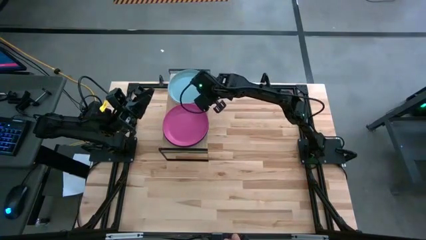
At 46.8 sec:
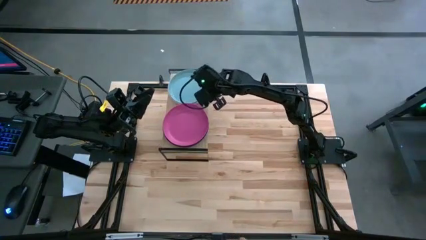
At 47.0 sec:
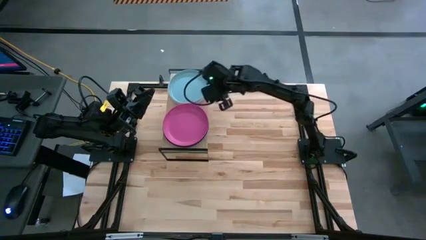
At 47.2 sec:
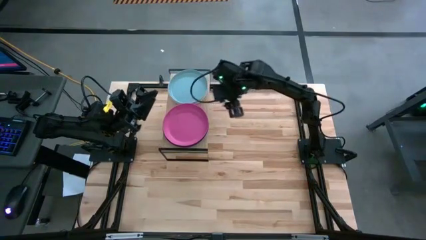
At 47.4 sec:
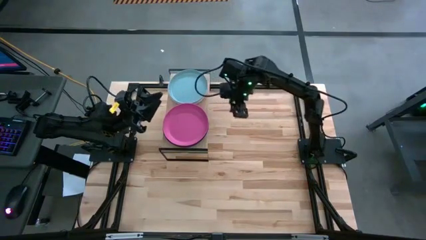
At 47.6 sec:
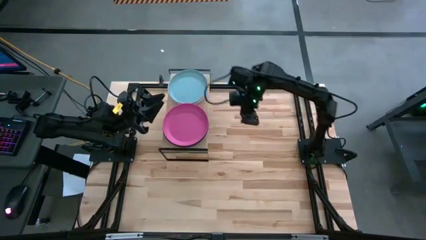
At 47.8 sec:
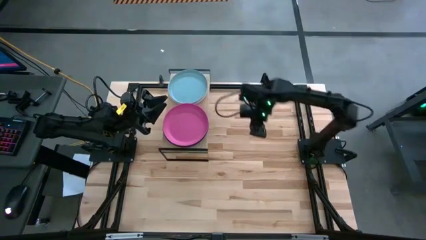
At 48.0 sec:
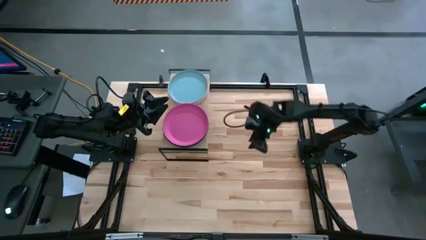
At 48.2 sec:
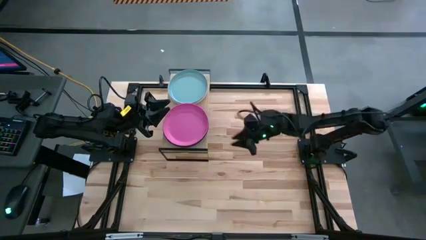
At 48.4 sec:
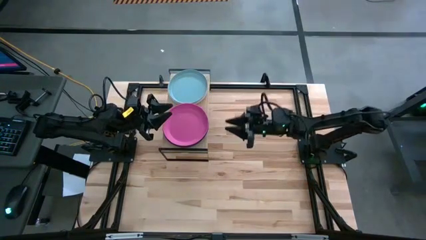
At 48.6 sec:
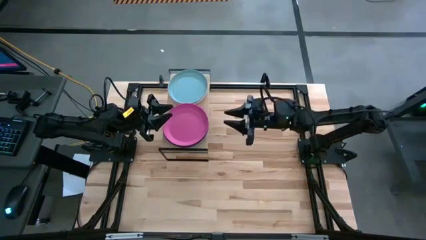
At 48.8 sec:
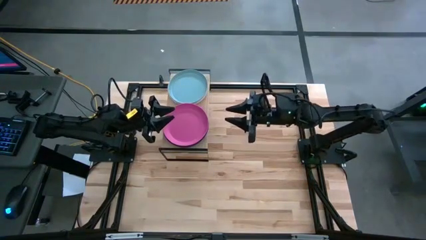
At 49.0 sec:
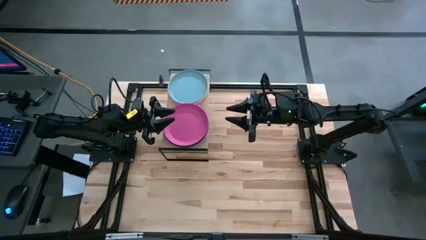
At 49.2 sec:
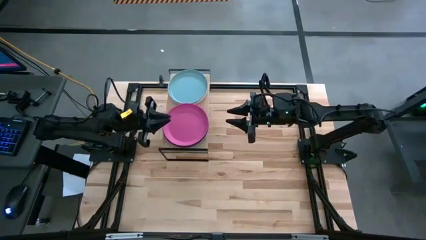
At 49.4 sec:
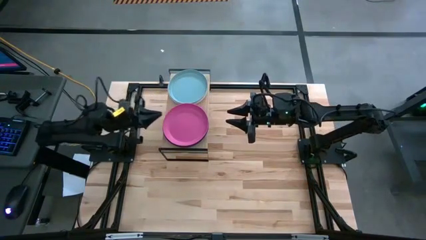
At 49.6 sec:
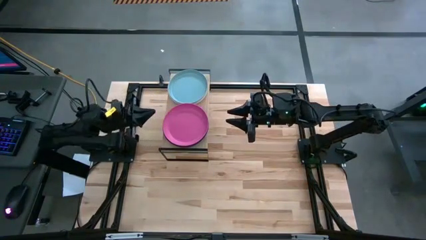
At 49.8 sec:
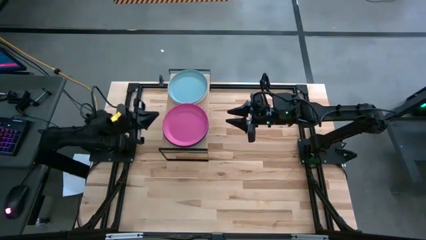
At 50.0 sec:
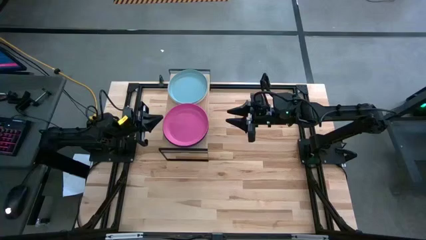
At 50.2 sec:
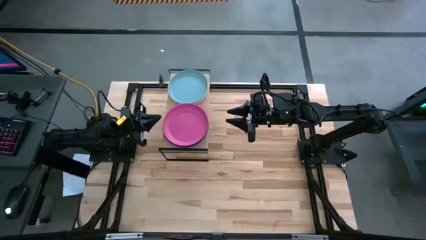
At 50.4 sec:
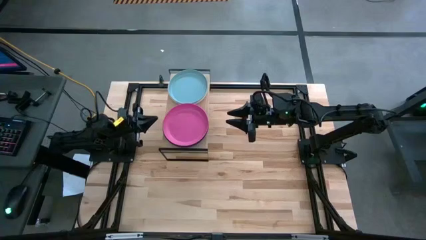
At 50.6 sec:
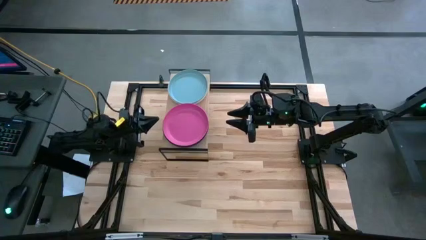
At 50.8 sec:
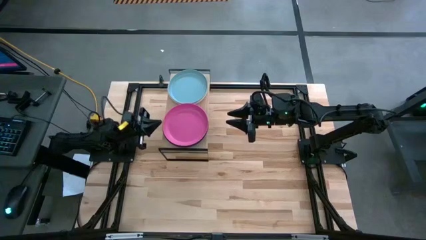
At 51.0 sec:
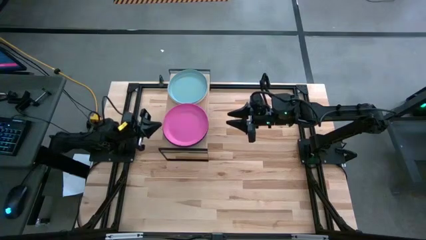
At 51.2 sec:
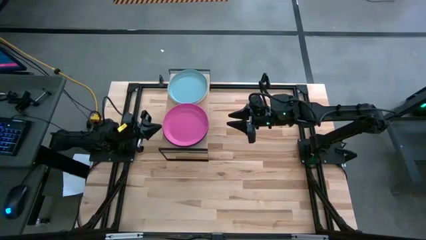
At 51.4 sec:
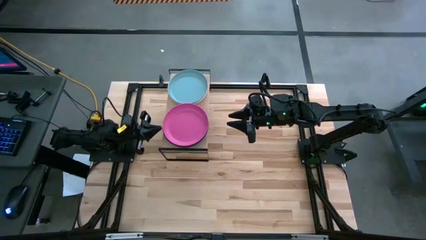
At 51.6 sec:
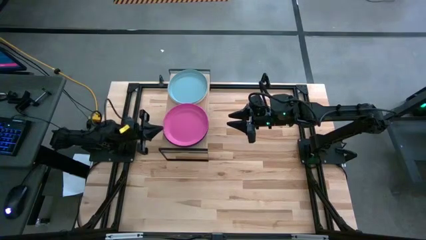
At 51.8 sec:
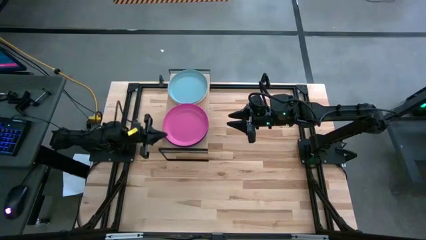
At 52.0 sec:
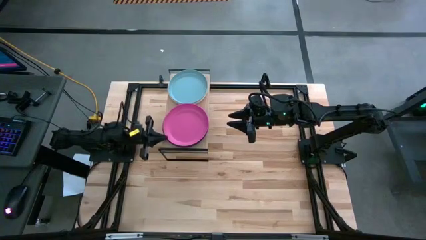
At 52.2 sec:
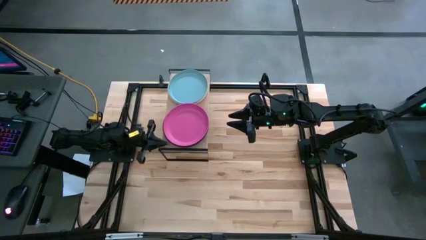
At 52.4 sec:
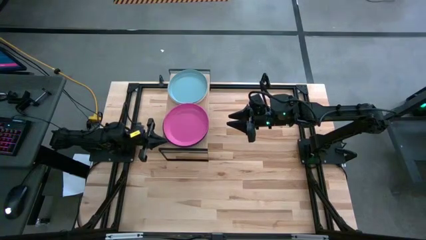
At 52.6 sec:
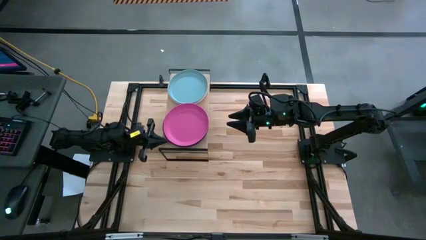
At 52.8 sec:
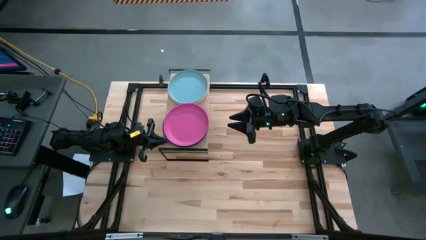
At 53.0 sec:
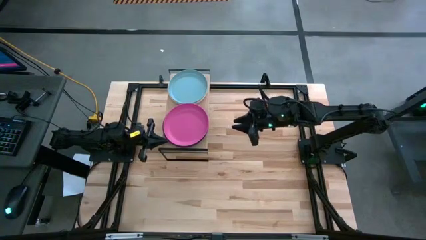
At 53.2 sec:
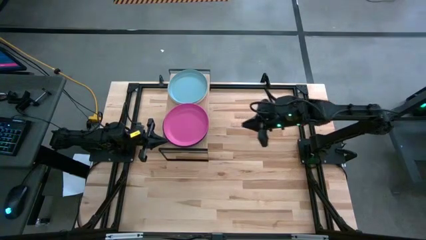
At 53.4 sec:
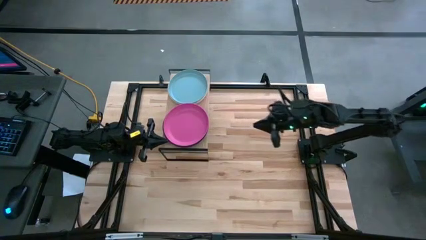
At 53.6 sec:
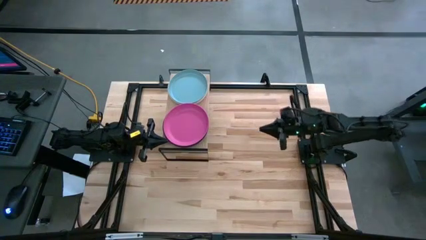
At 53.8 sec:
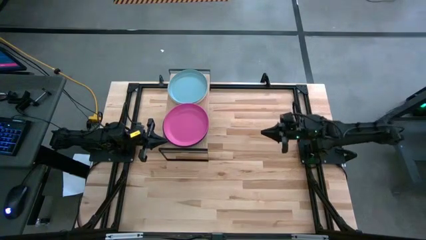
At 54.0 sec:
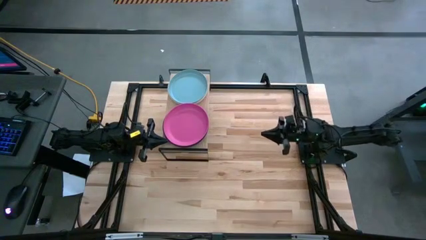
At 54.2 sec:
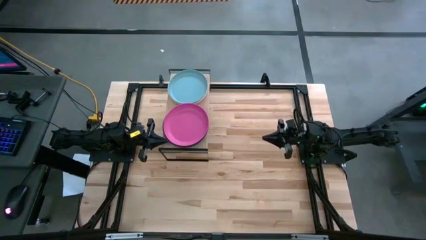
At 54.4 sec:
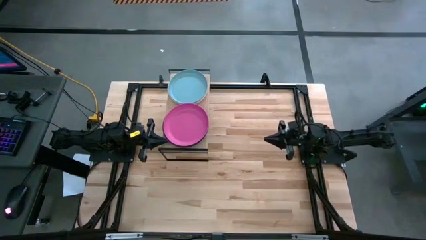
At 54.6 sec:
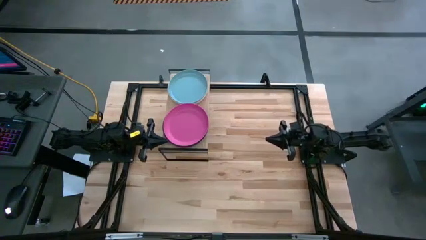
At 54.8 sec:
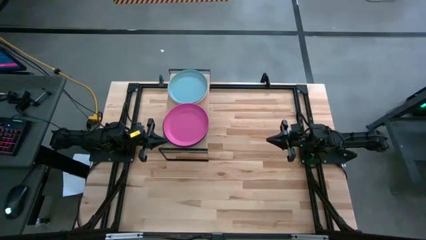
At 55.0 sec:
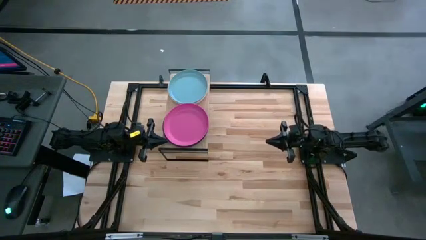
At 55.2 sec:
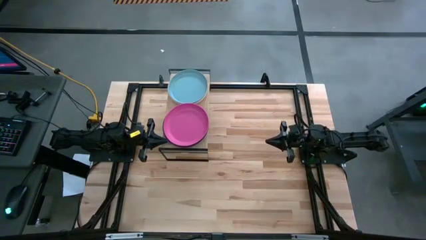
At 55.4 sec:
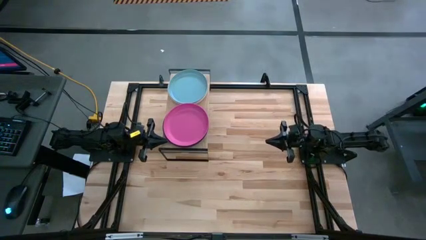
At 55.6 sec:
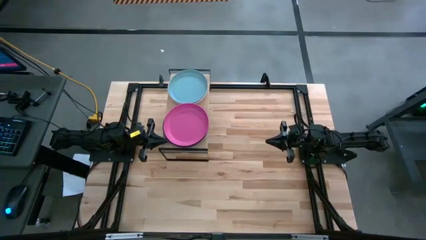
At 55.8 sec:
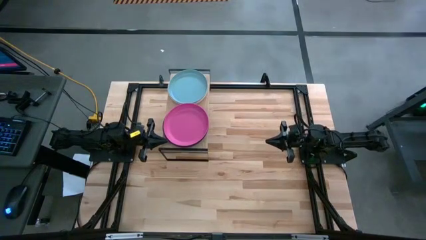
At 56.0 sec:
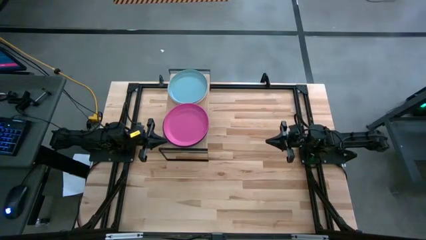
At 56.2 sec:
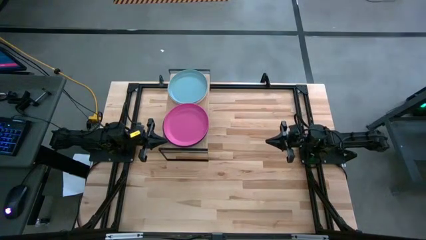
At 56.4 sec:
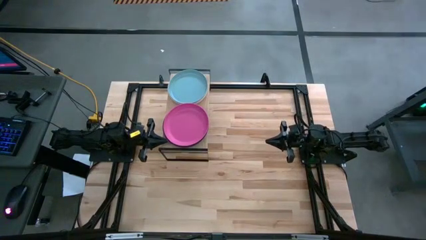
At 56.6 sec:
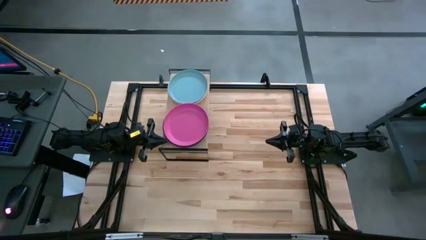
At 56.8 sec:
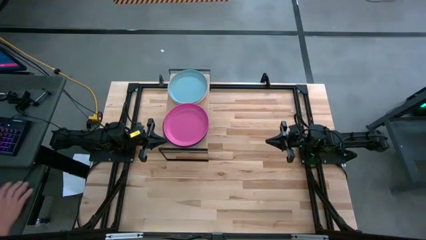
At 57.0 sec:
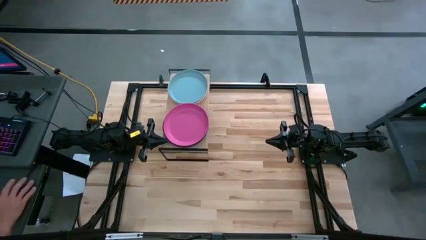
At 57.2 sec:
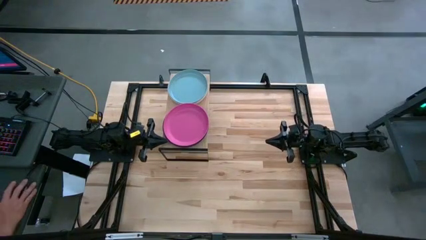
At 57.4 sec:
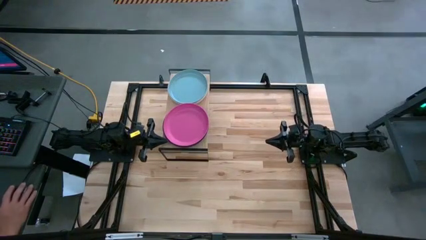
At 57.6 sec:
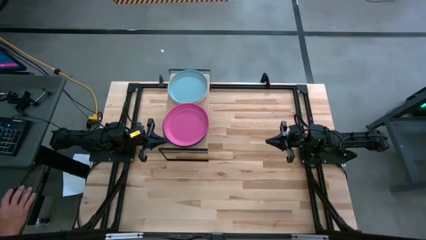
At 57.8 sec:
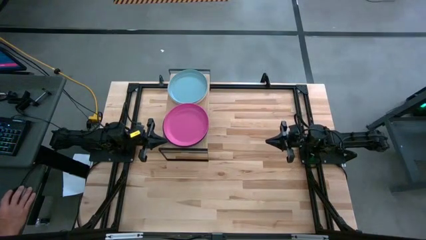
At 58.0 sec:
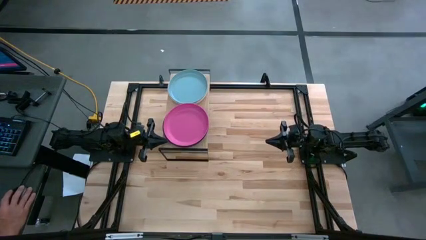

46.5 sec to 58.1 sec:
Task: Place and stack plates onto a shelf
Return to Home Position
